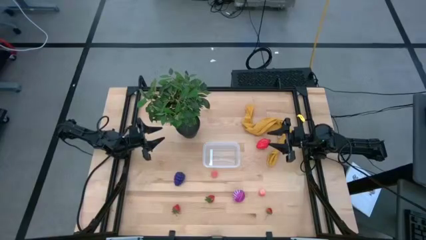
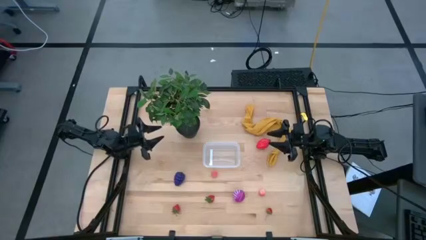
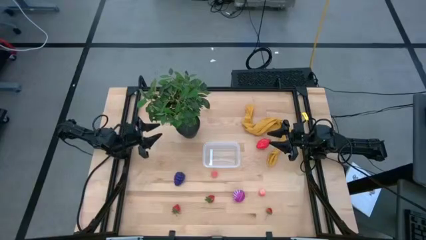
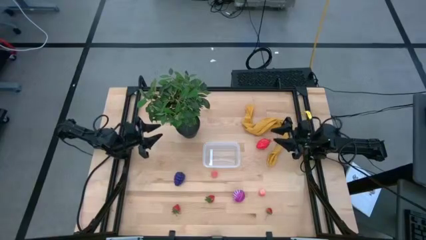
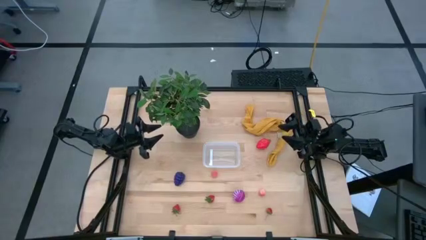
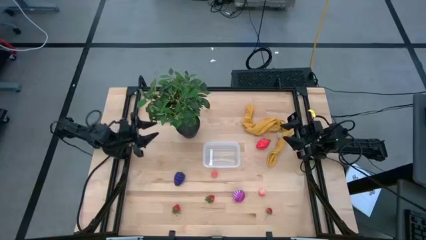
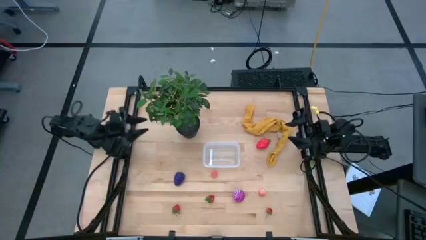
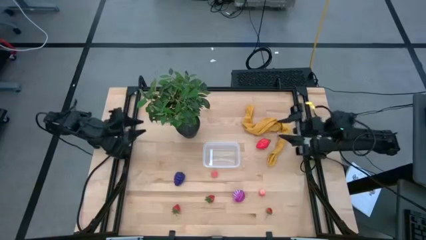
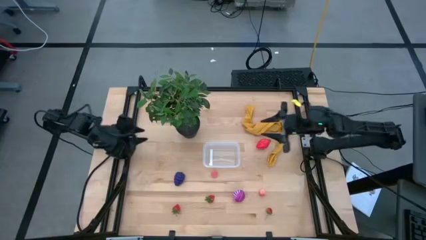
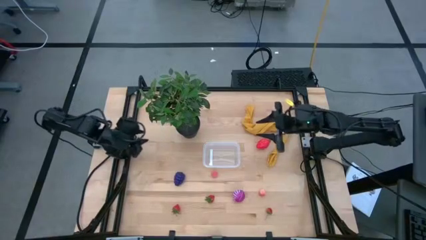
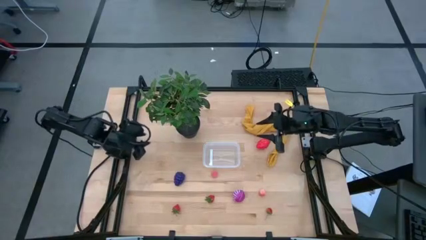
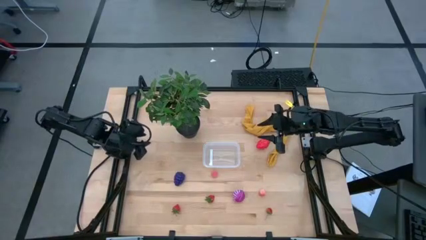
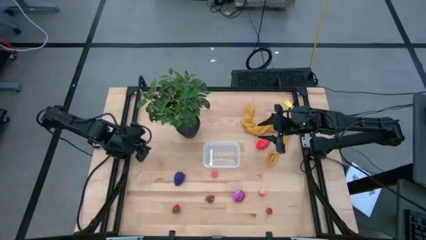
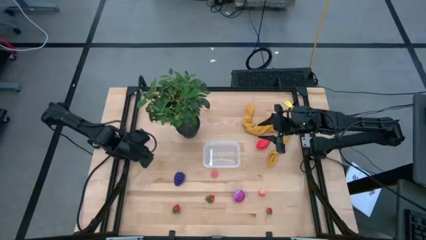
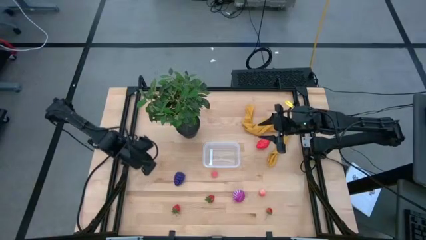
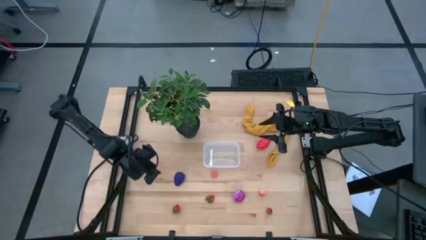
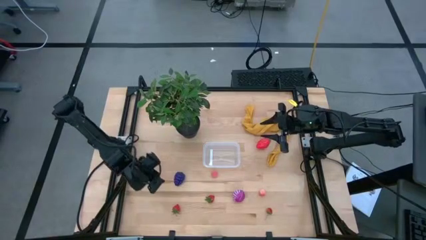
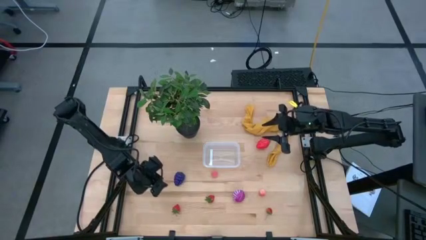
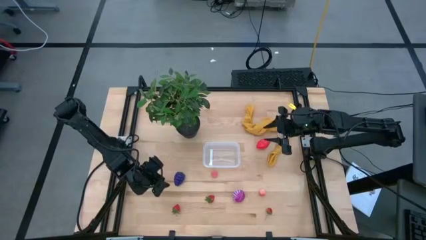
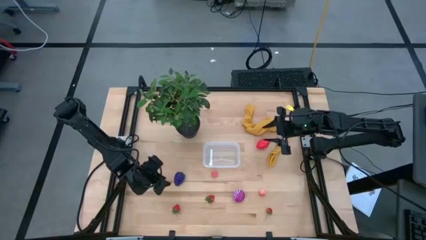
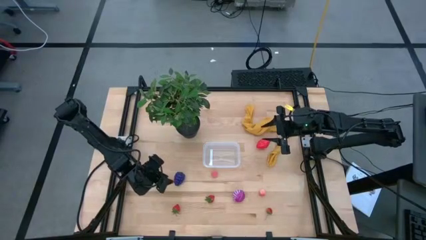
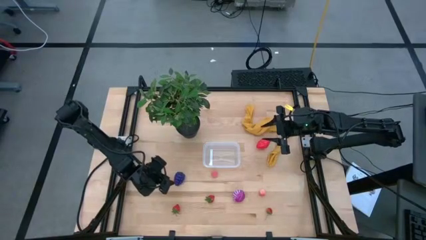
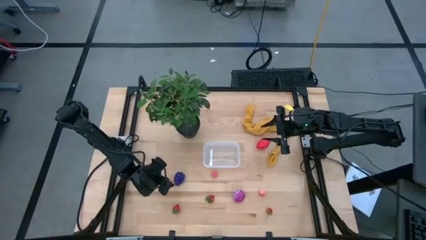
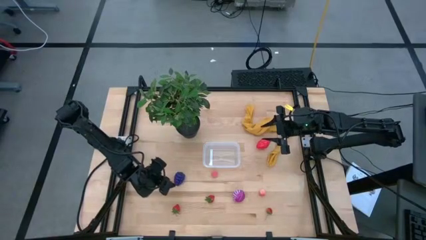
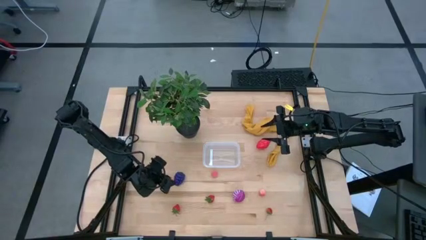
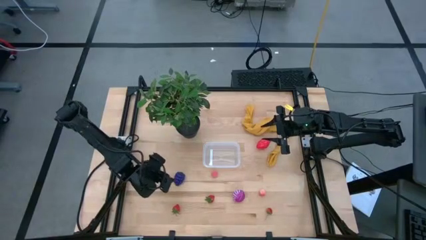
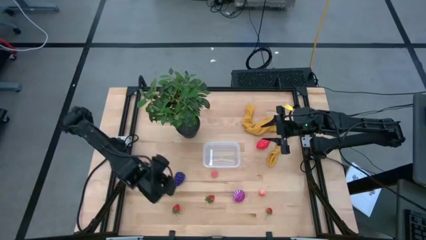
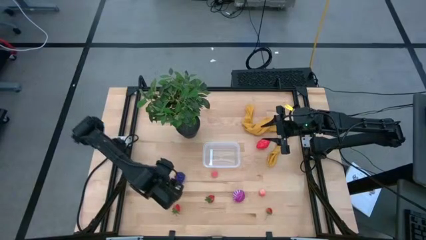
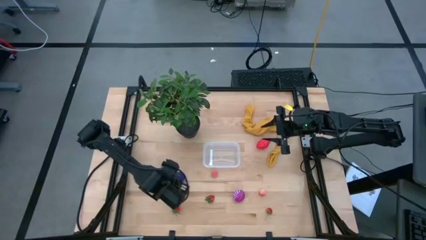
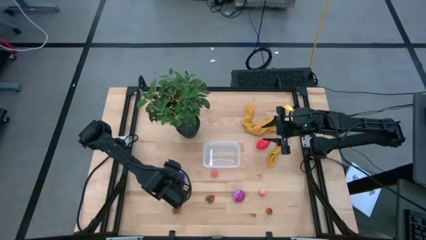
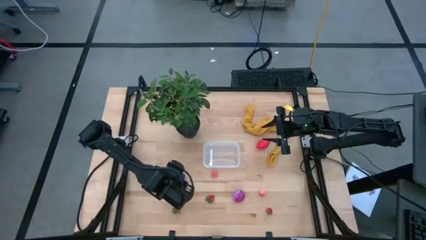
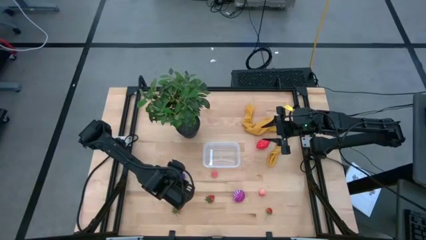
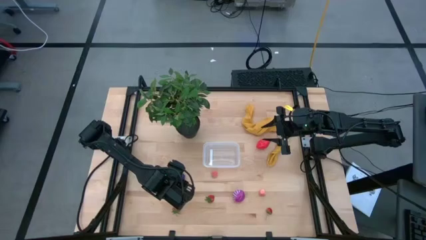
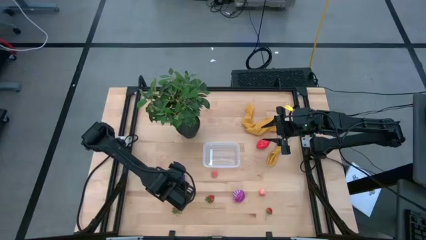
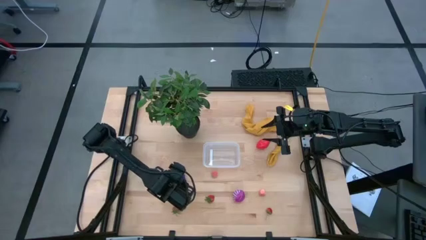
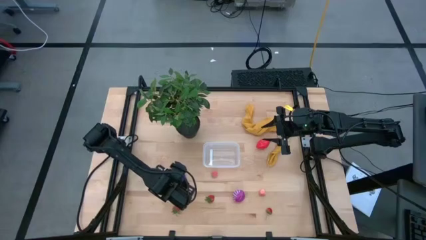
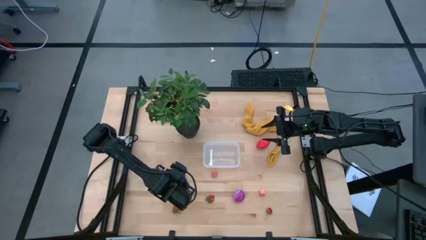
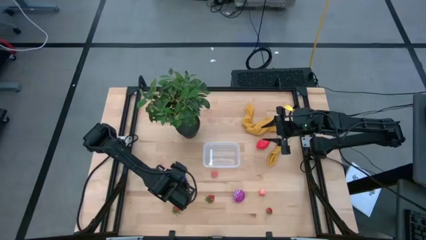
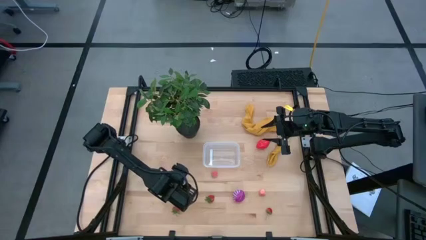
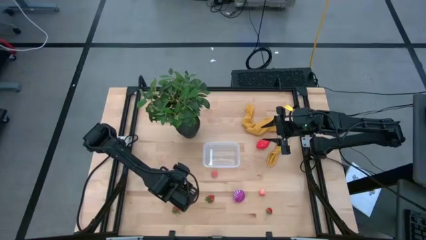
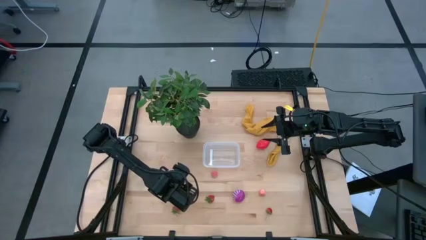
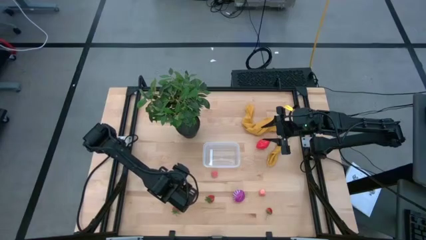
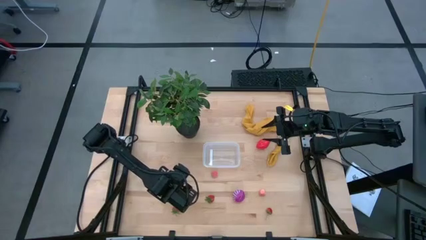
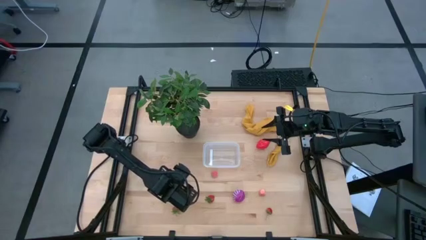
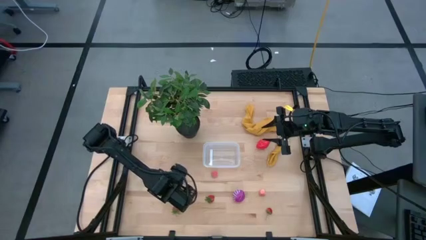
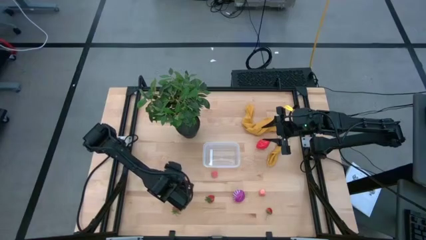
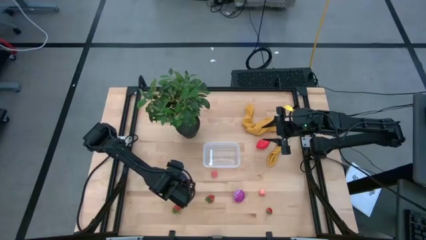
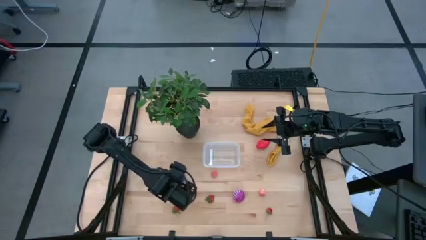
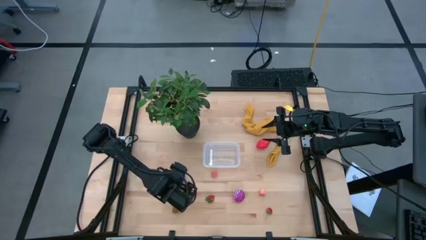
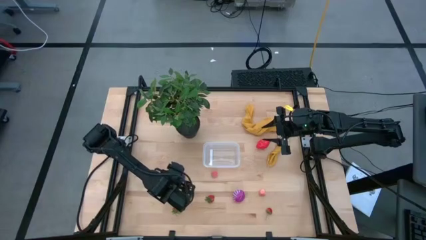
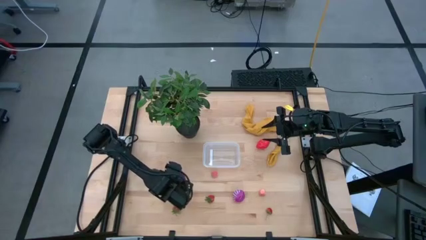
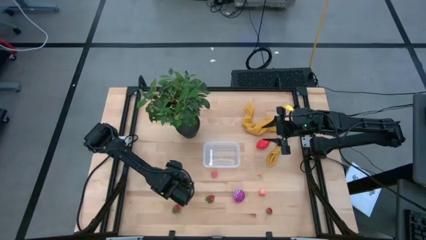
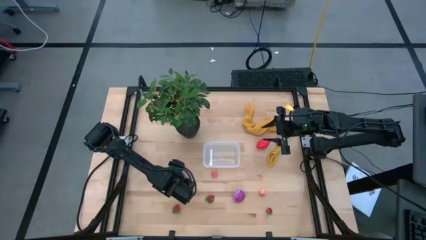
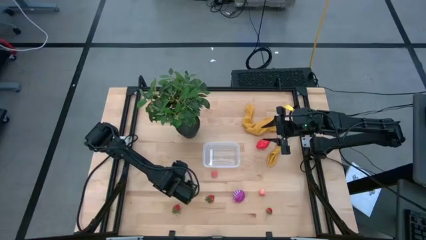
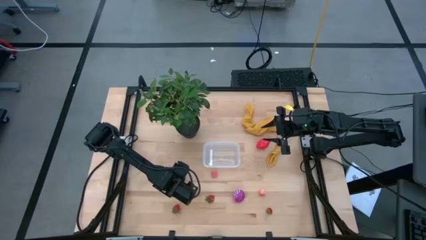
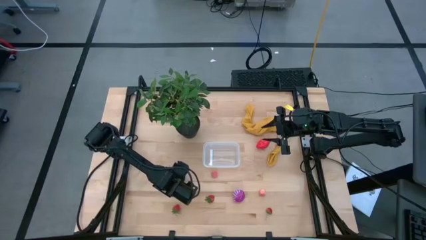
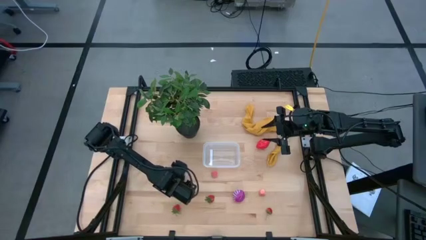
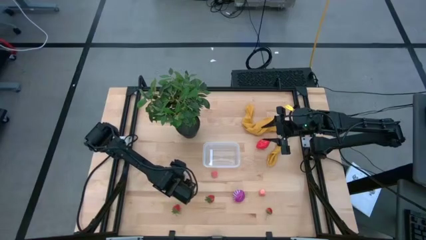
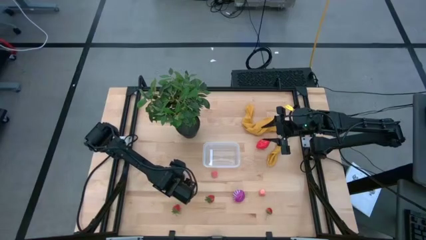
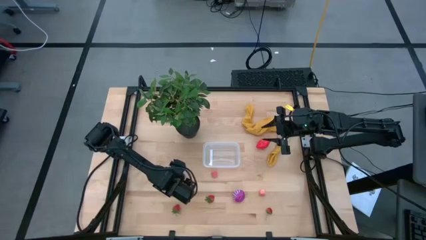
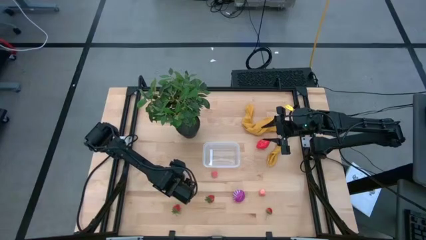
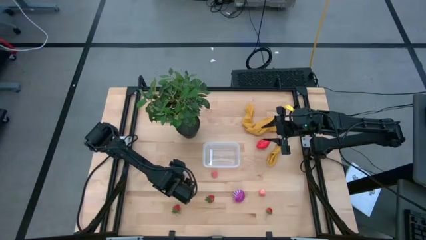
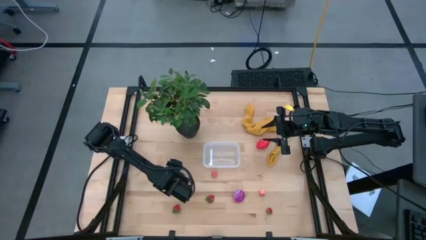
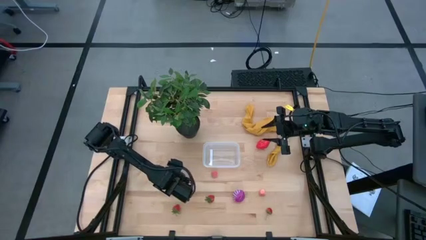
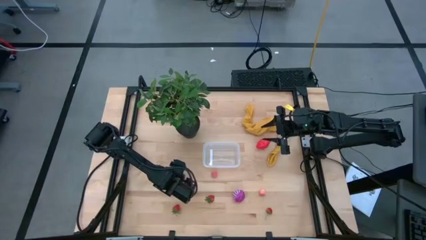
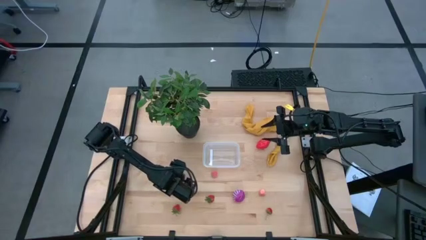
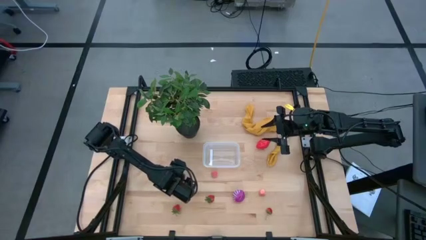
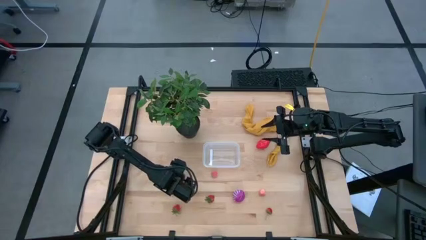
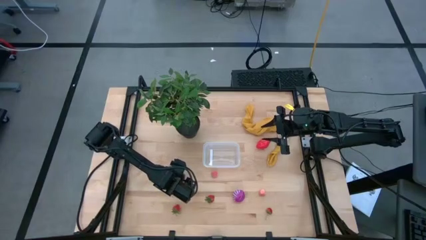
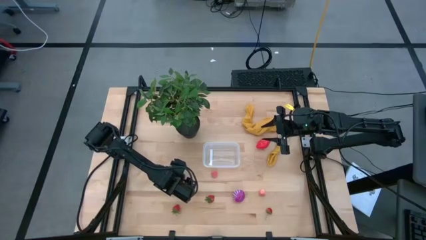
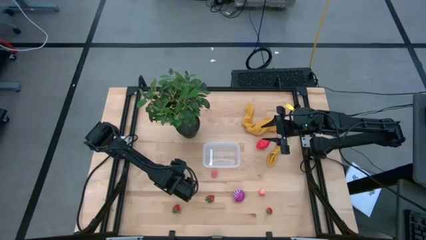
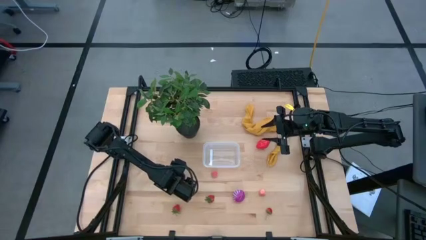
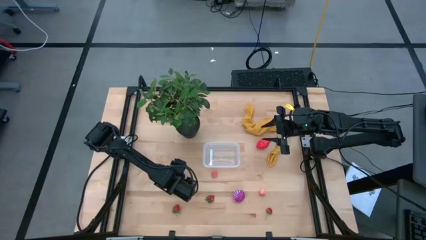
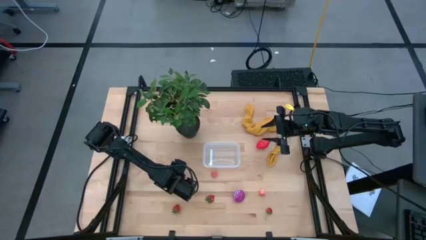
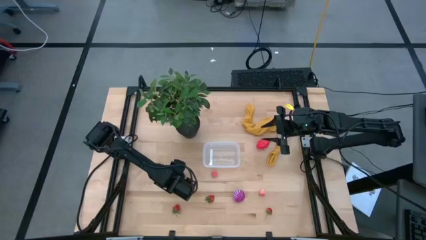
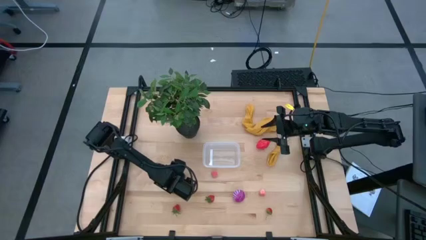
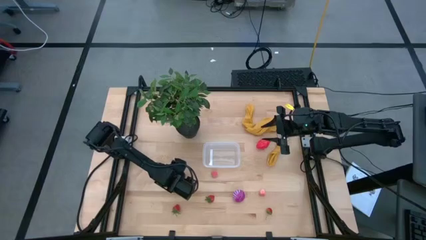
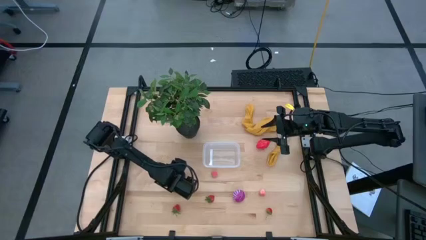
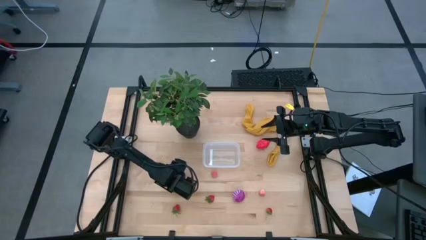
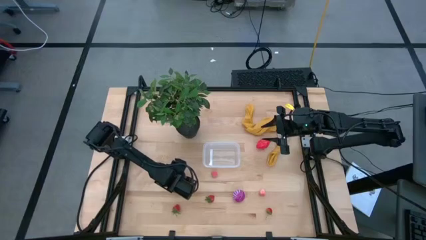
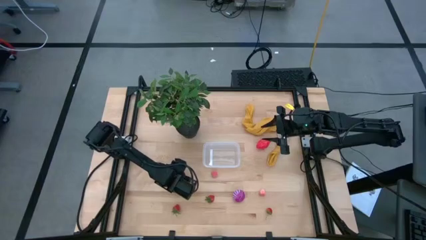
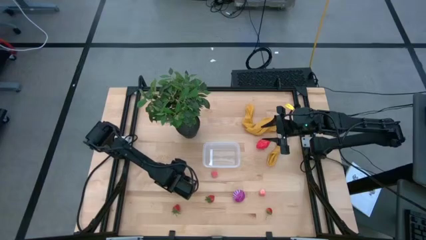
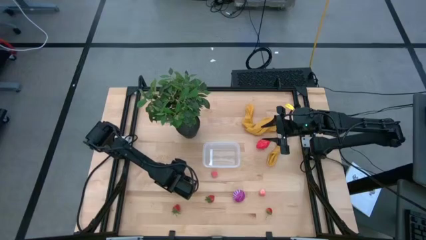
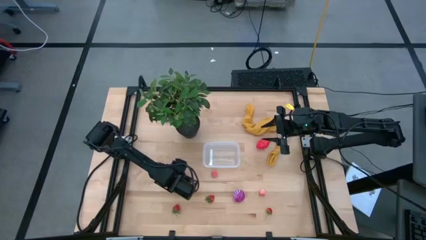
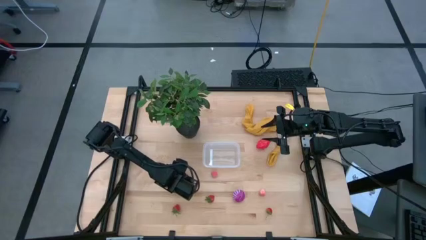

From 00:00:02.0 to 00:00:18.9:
Task: Pick and placing Produce into tupperware
Put the grapes into the bin
